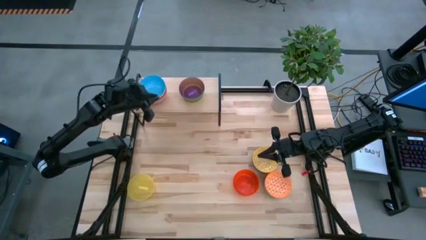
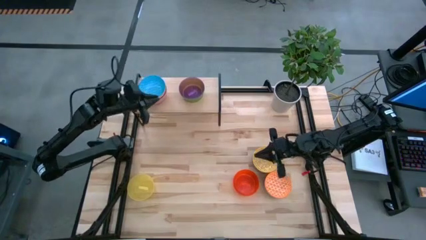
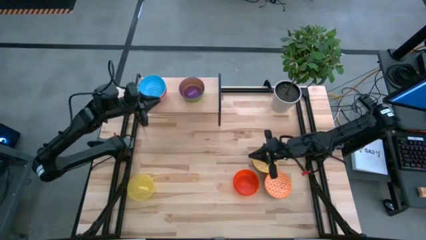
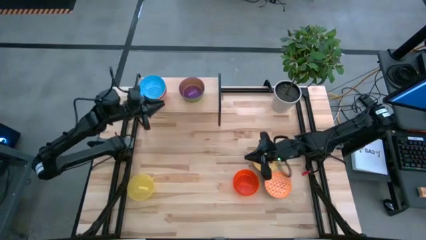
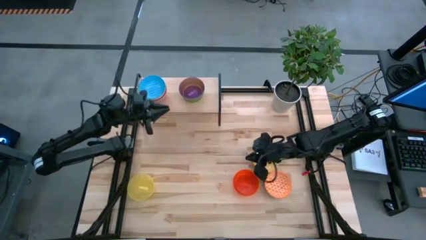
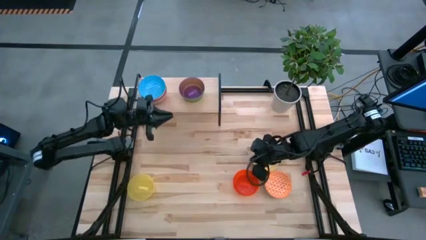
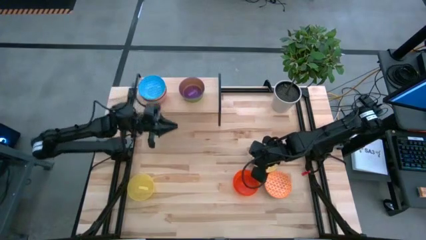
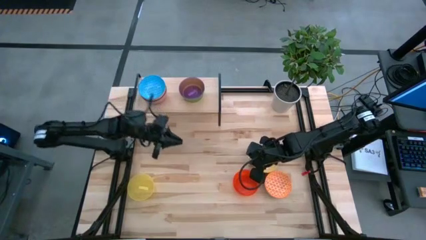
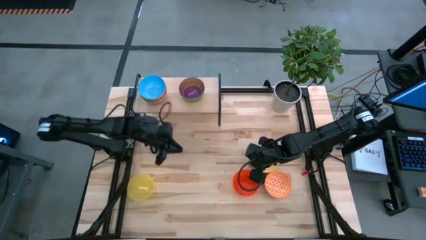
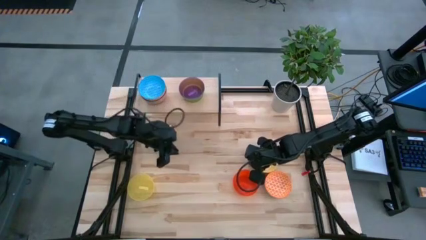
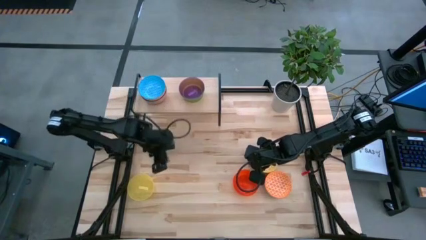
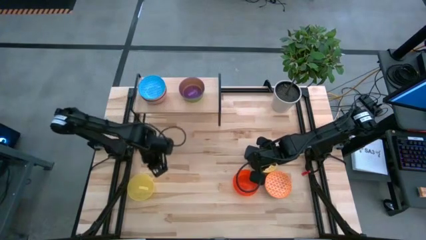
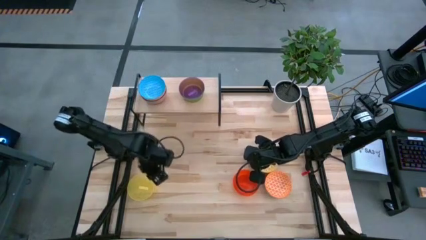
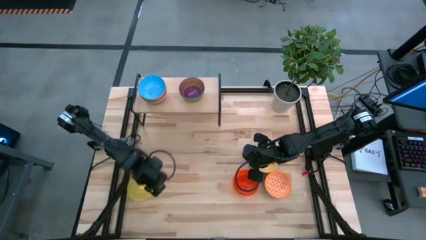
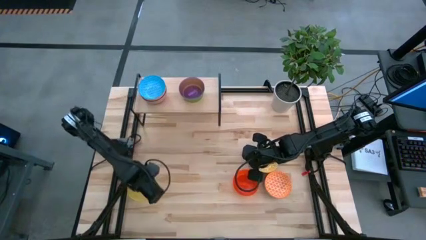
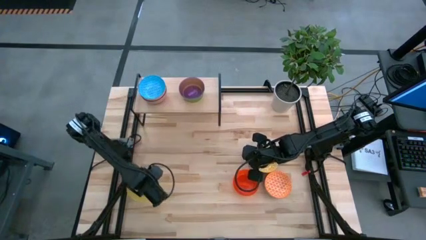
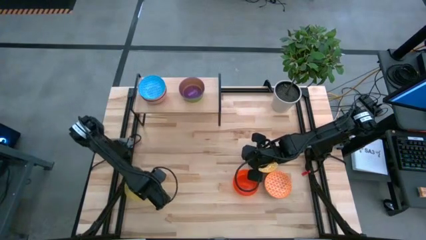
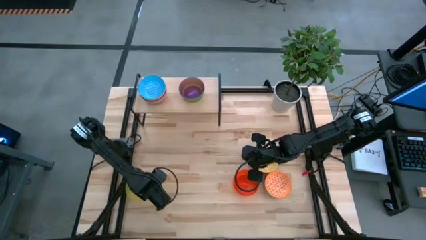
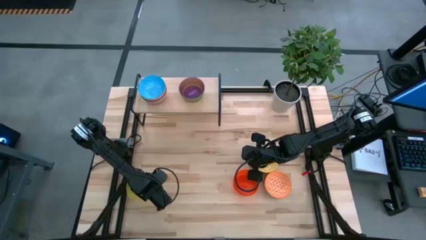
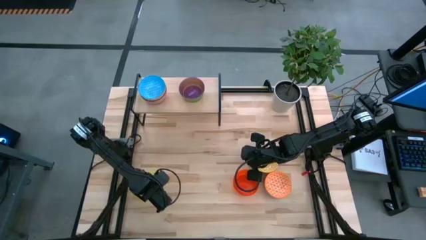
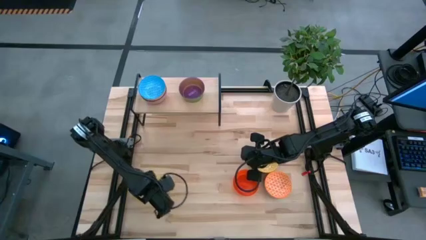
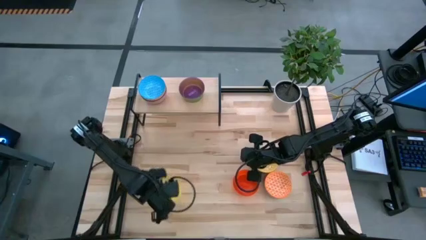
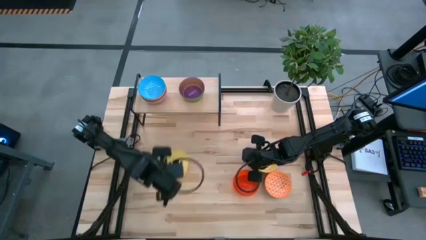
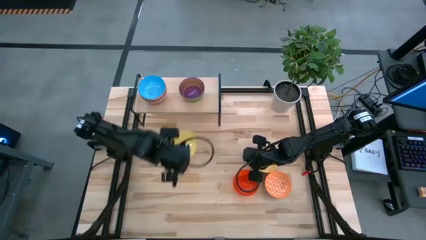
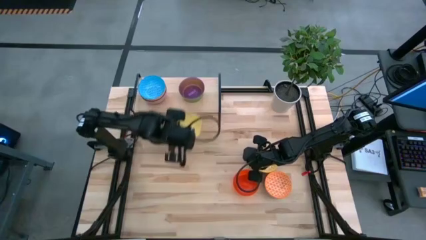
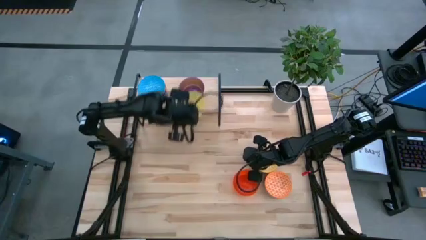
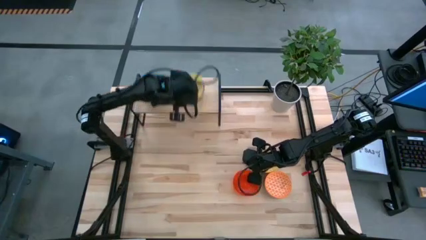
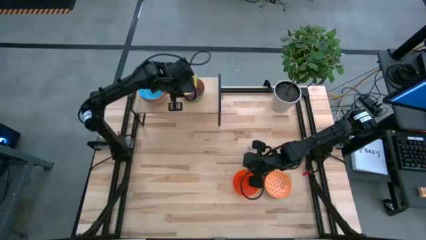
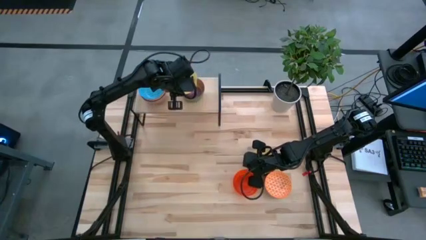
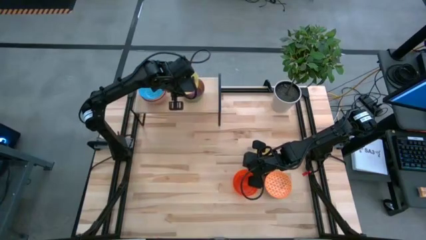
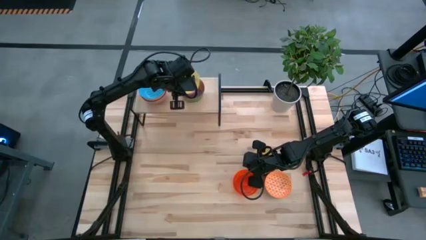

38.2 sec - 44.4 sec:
Task: Place and stack bowls onto a shelf
Stack the light yellow bowl on top of the violet bowl on the shelf

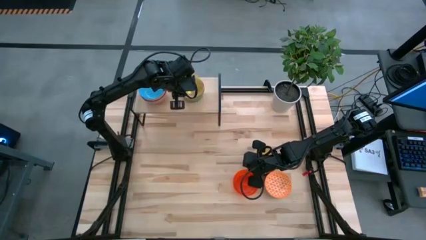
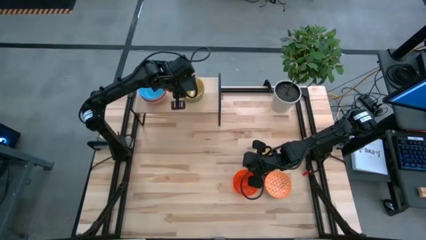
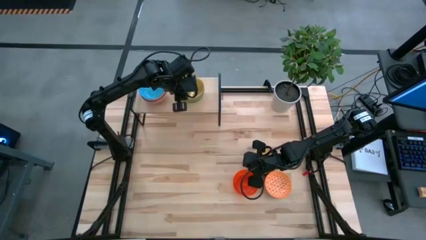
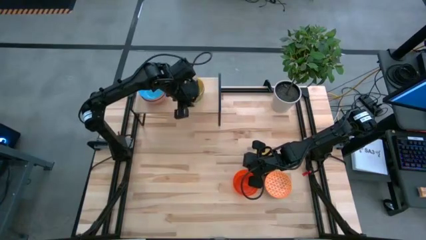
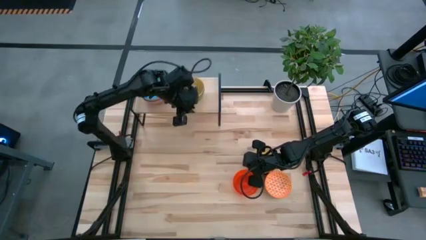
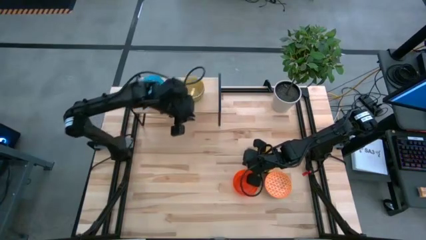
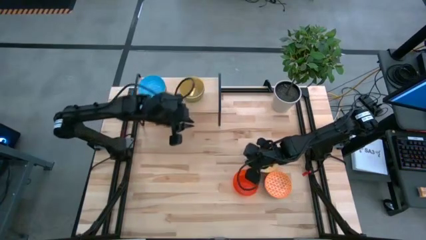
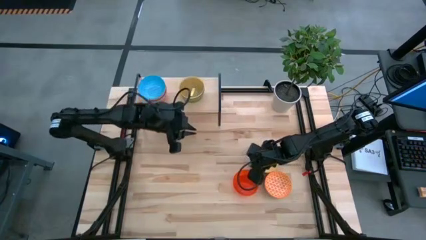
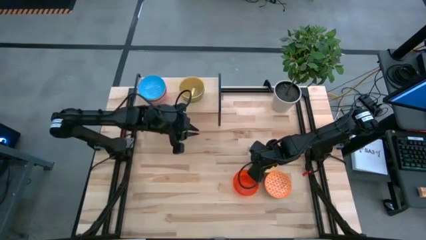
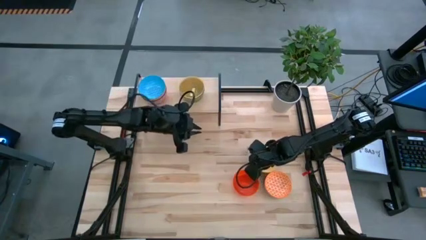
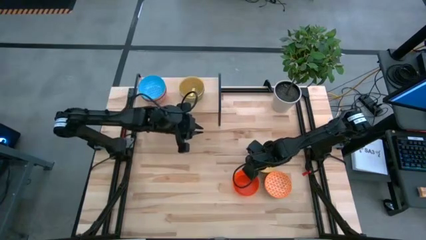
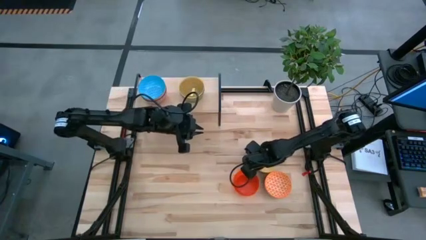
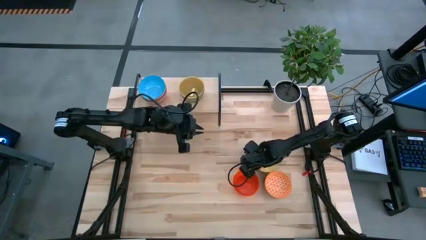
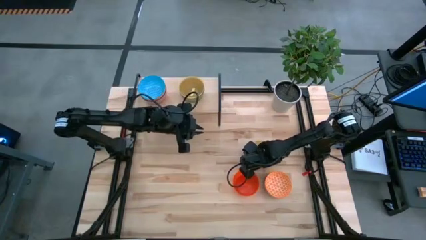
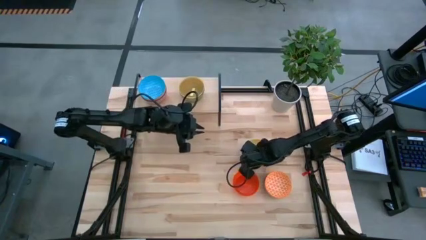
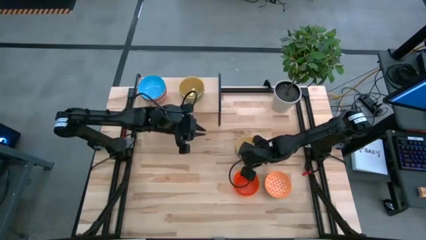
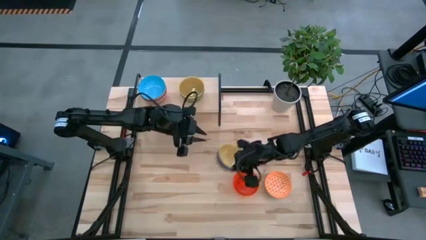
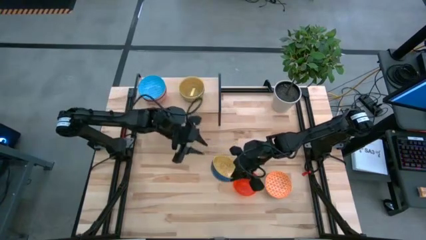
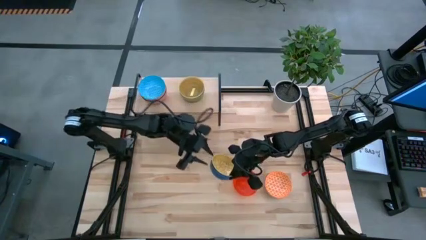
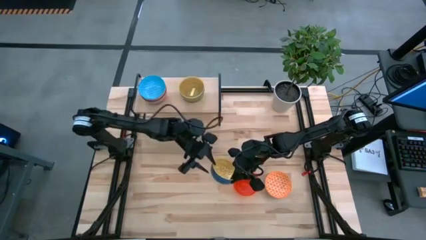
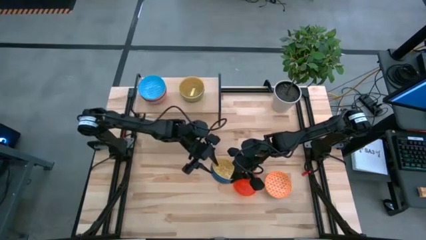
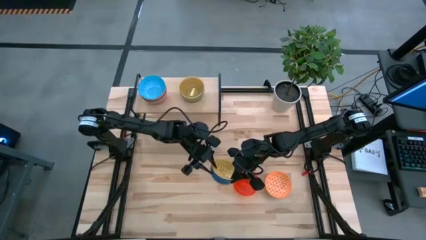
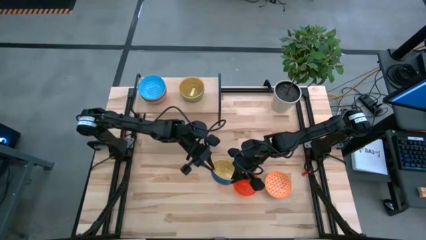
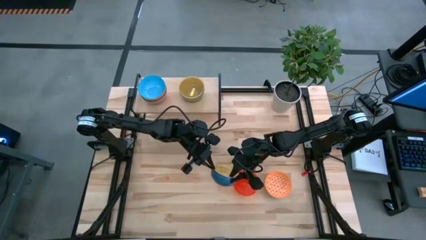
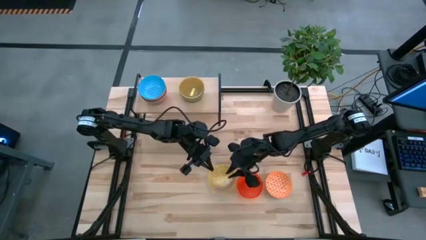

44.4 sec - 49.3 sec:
Stack the yellow bowl on top of the light blue bowl on the shelf

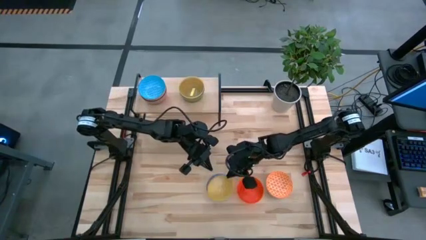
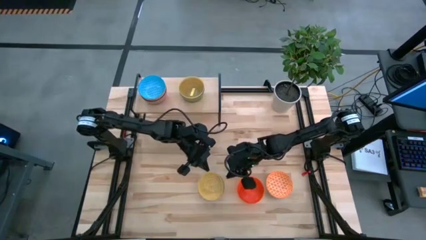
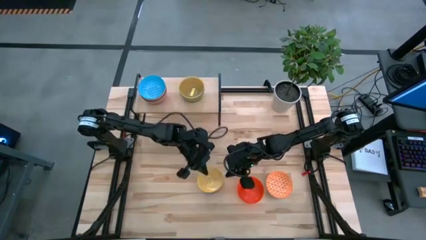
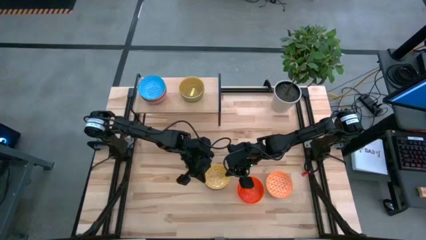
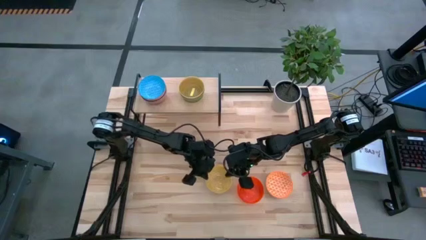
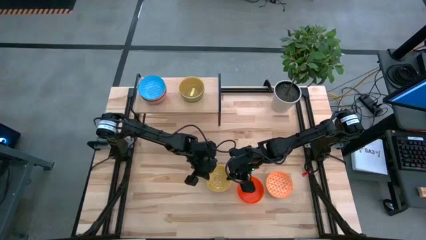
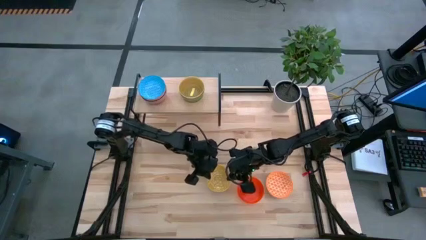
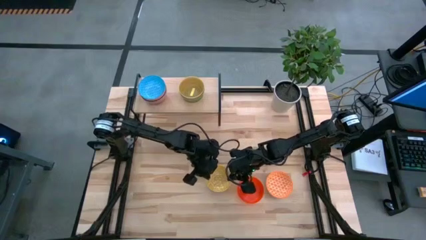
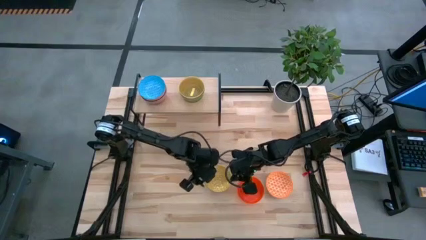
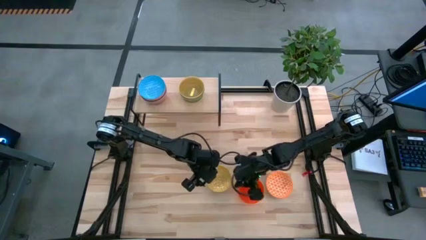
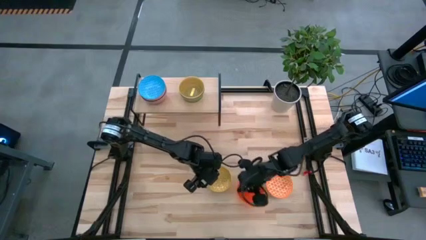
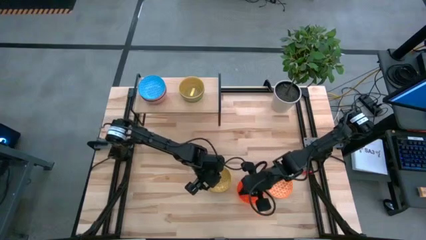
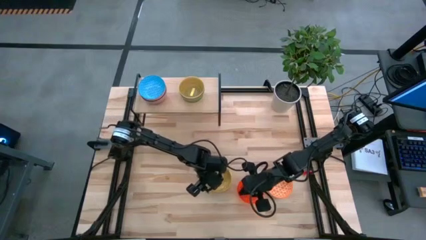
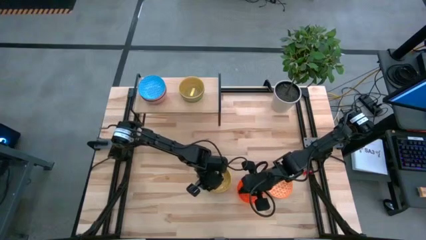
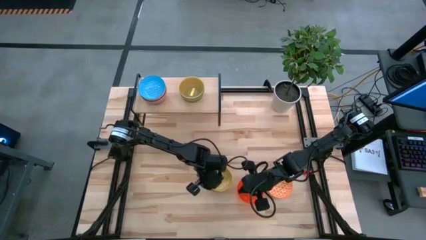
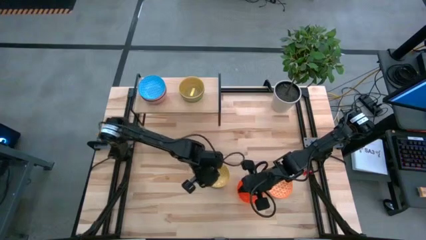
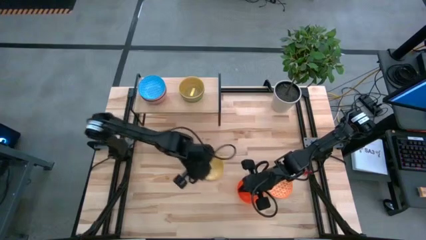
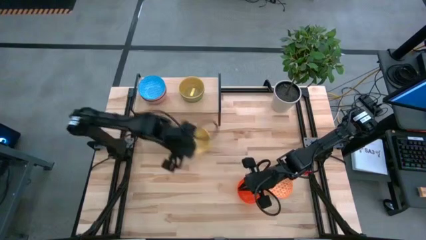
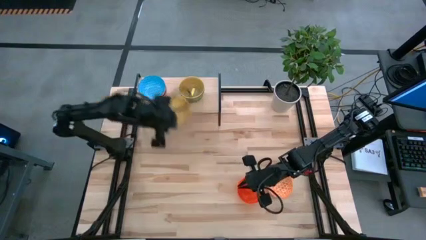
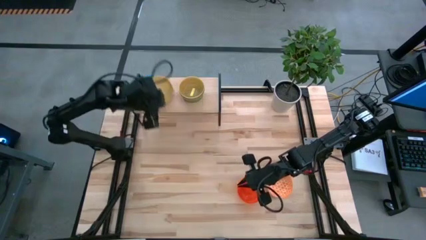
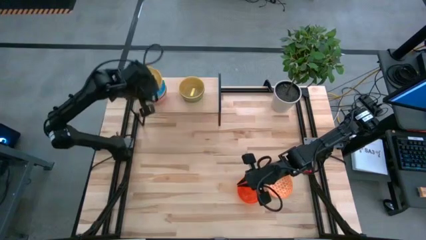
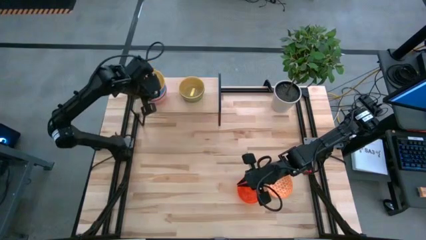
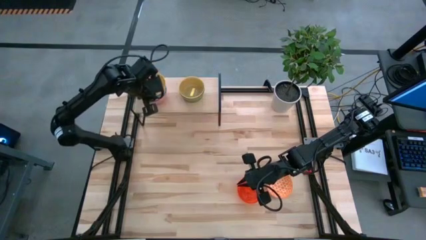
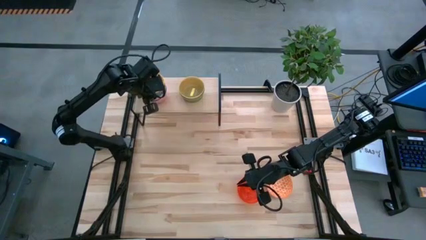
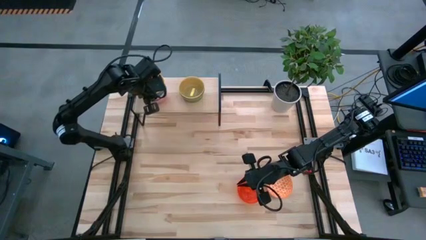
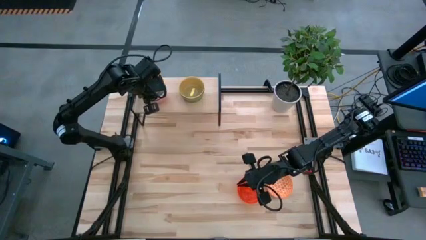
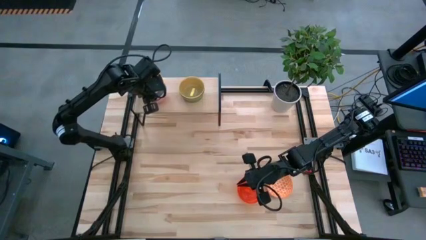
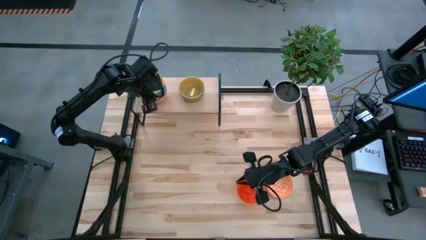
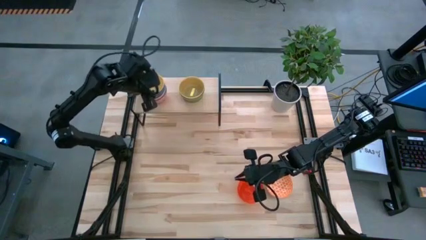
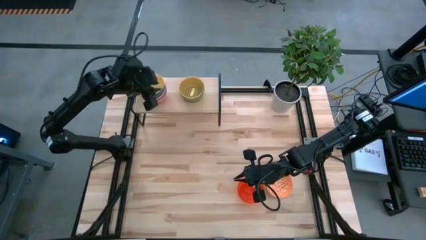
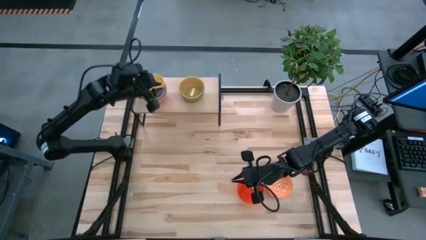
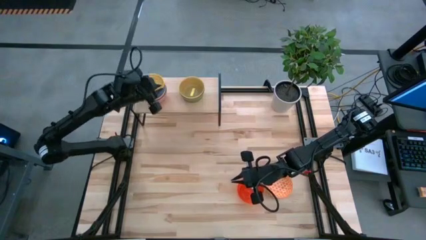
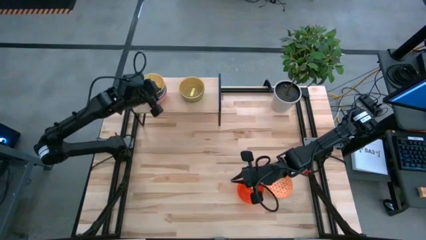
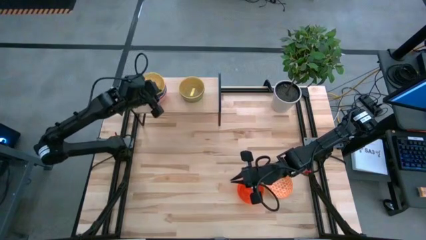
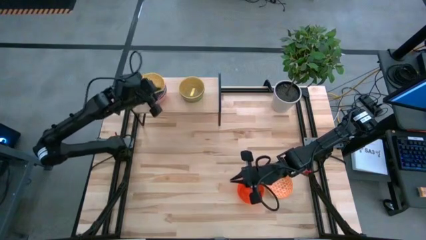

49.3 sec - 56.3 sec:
Stack the yellow bowl on top of the light blue bowl on the shelf
